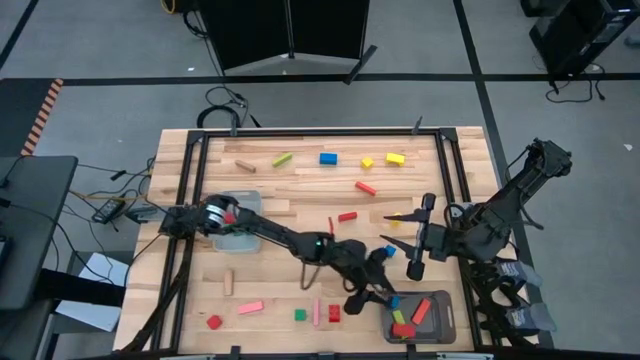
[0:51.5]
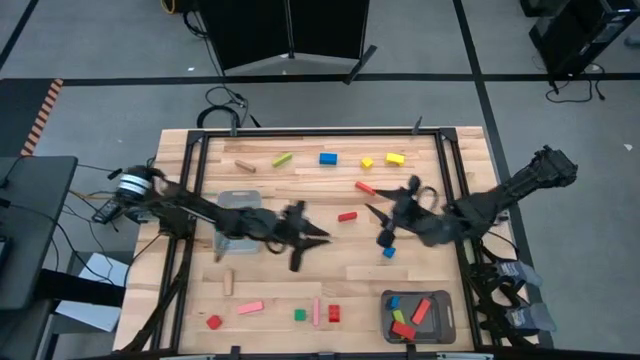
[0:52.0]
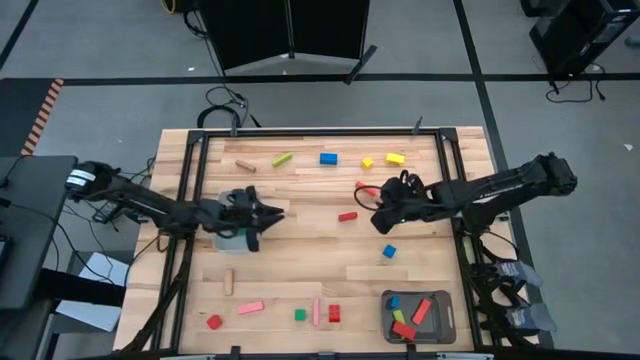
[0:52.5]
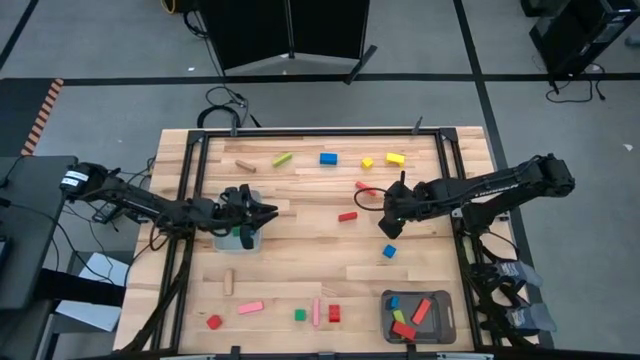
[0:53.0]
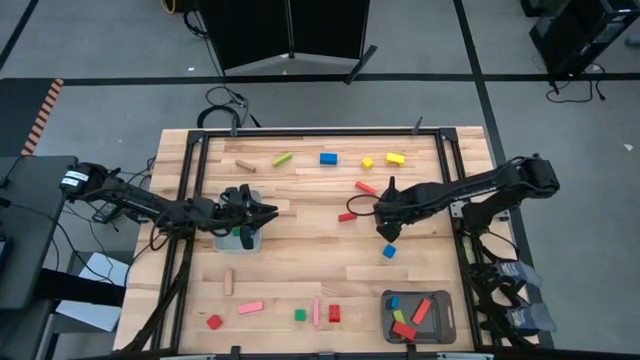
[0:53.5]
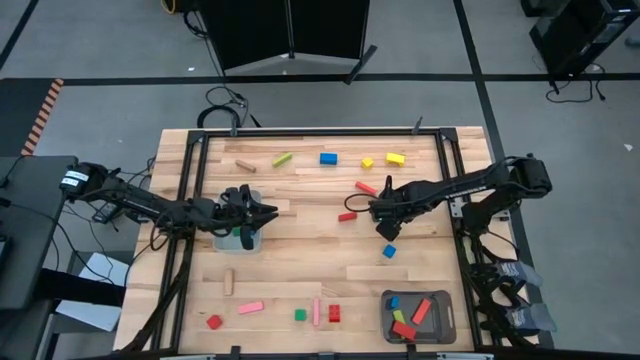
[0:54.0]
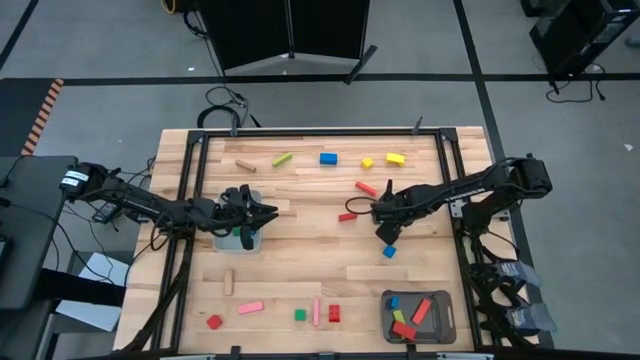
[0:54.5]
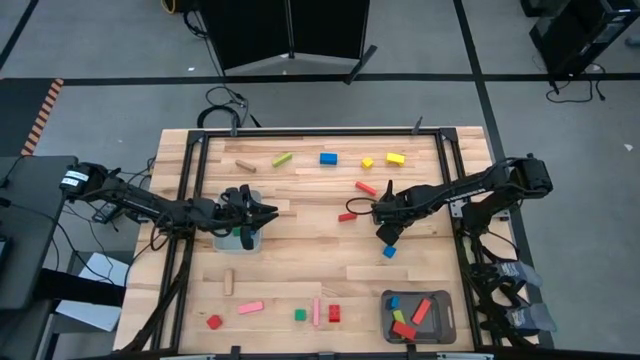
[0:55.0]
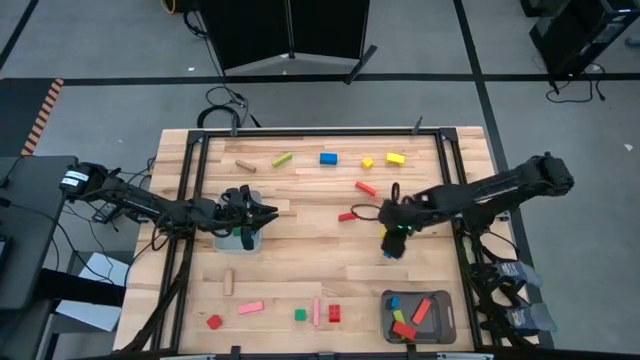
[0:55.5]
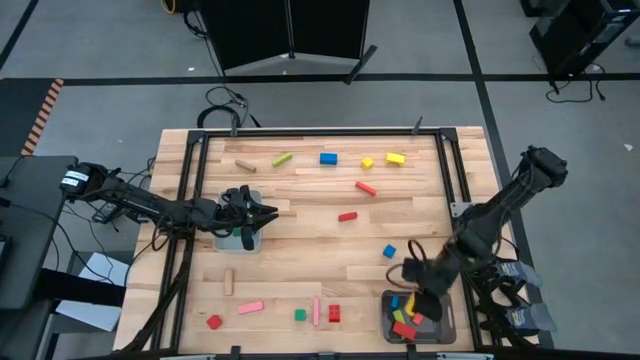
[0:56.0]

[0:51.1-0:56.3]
Task: Sort blocks by size
Put the bottom center right yellow block into the black bin

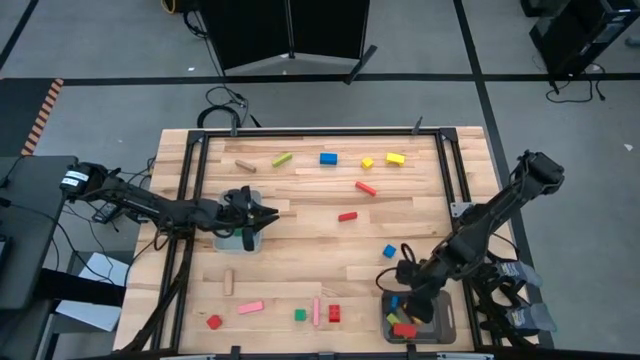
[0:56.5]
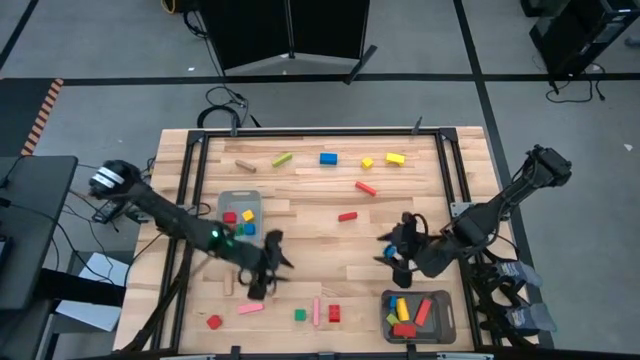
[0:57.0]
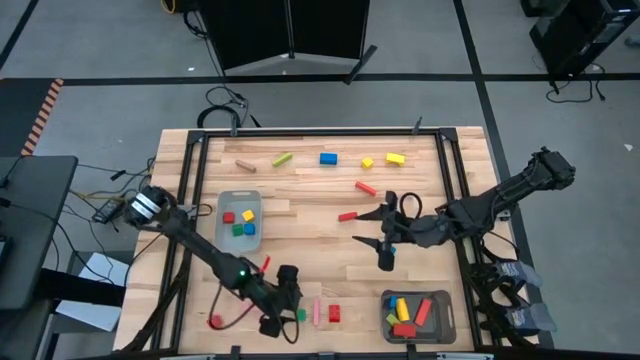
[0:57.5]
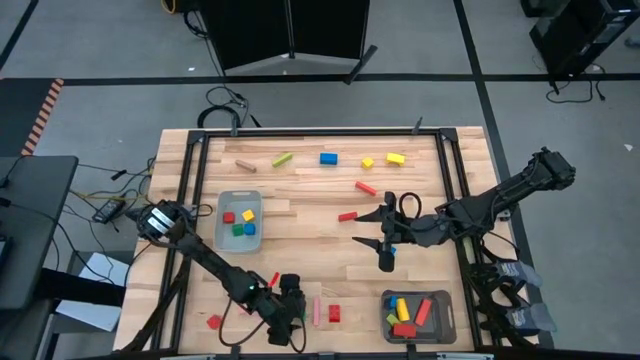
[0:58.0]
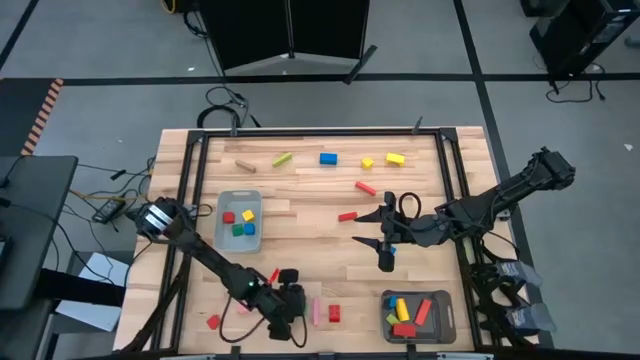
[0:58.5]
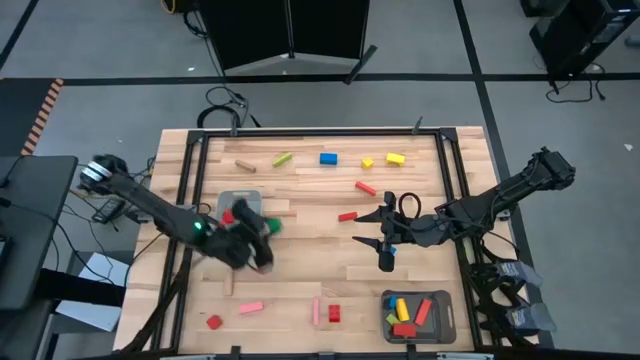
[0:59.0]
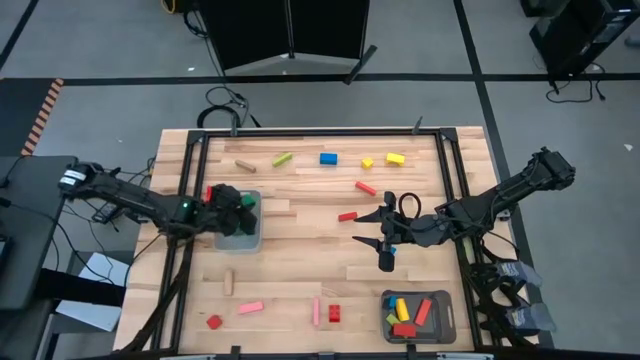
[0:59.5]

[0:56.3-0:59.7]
Put the green block into the grey bin

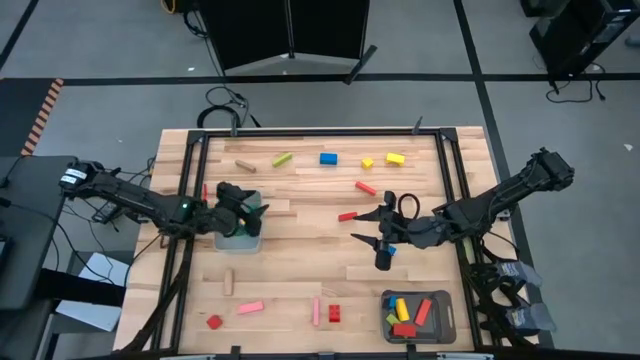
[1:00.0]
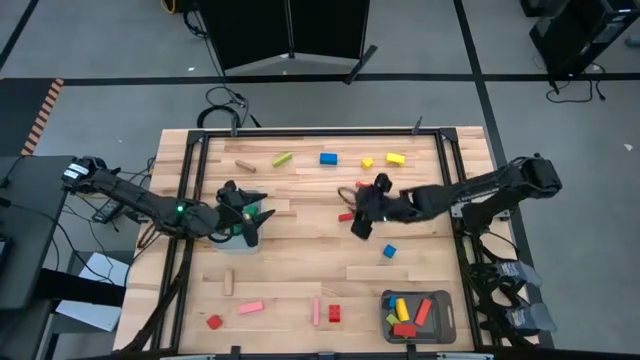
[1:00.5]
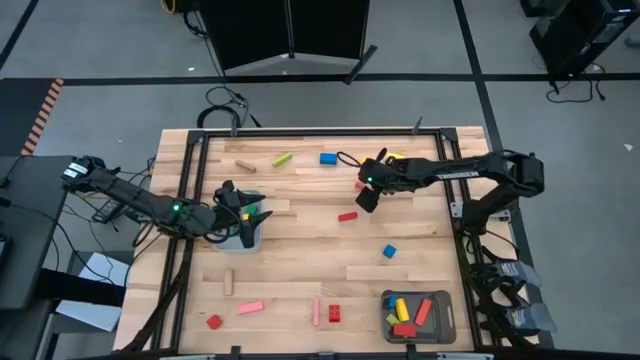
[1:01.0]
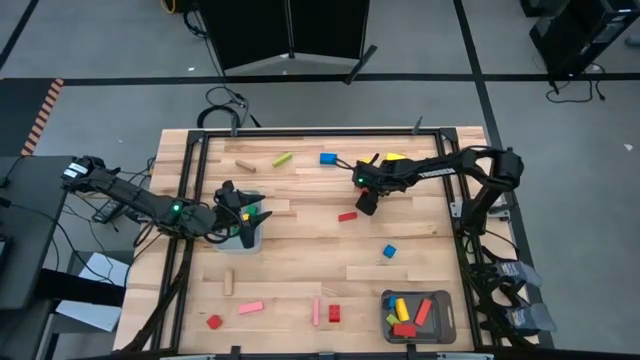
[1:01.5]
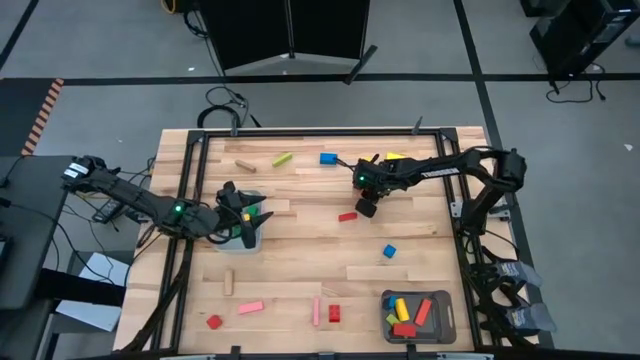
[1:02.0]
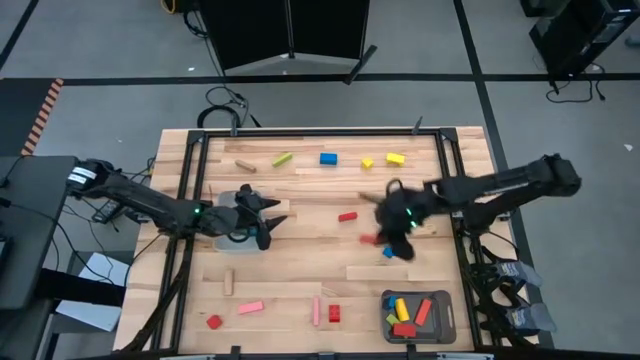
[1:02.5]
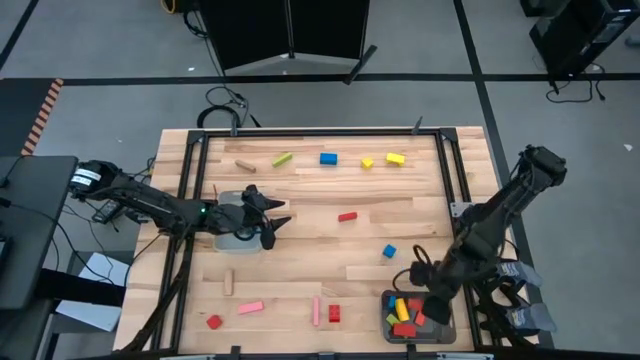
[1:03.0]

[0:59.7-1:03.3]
Put the top right orange block into the black bin

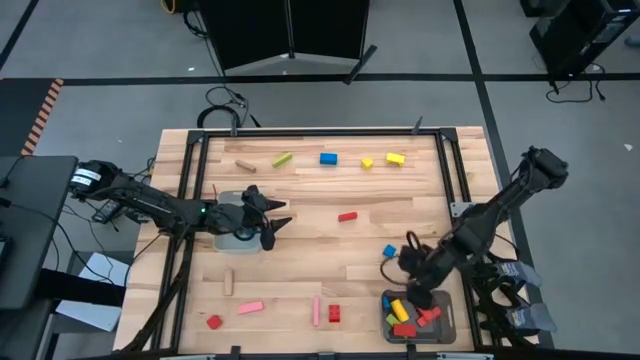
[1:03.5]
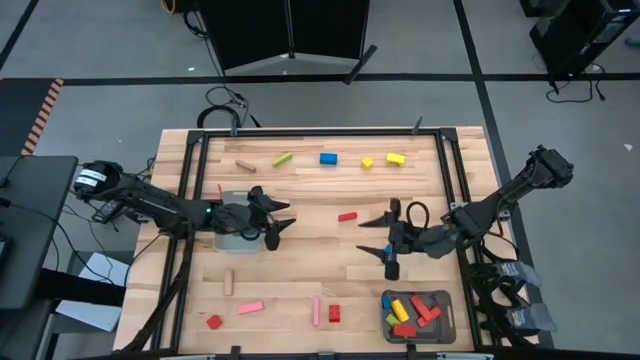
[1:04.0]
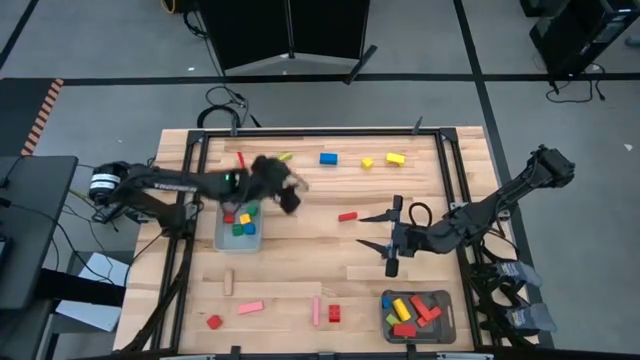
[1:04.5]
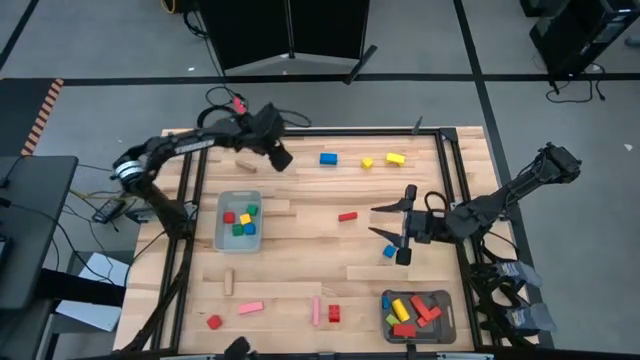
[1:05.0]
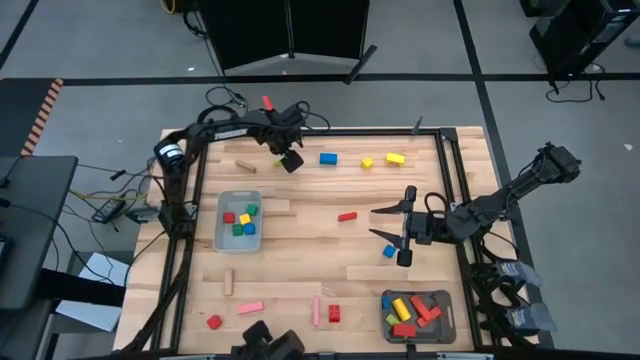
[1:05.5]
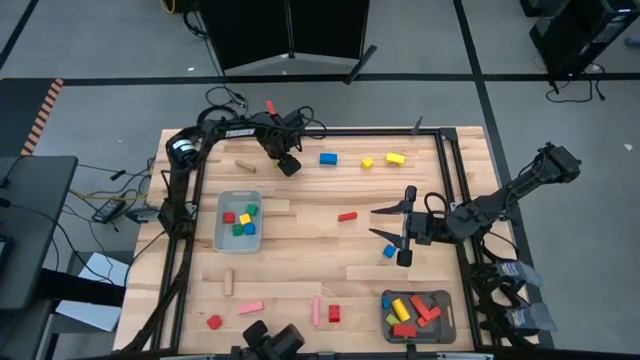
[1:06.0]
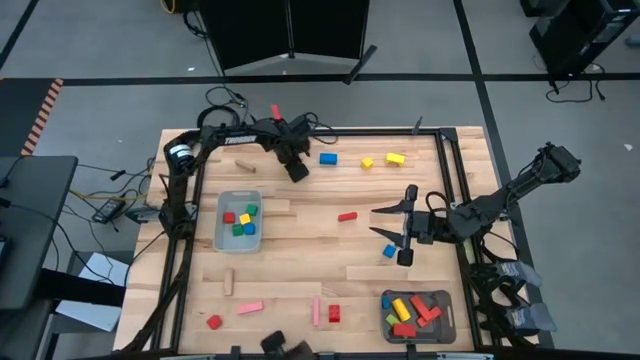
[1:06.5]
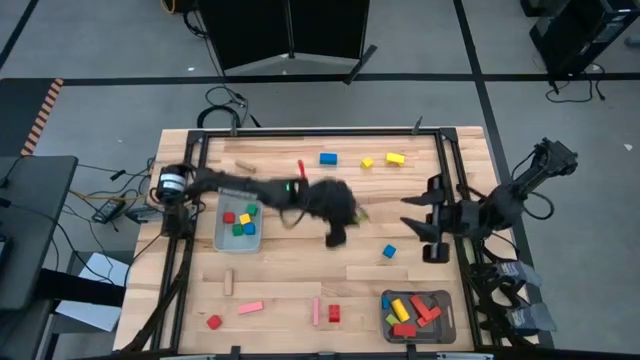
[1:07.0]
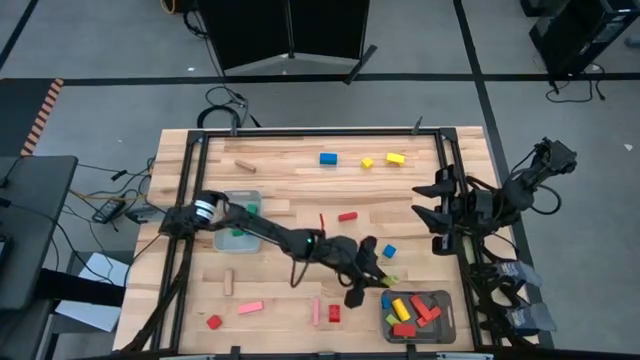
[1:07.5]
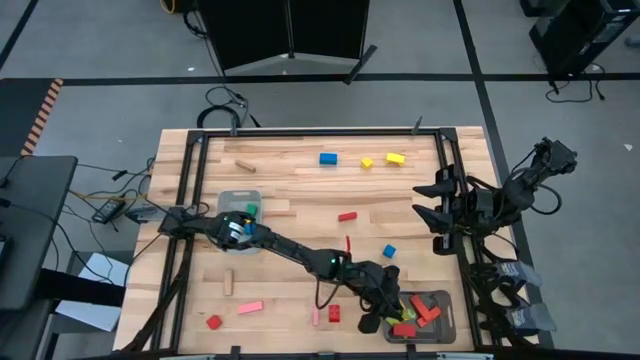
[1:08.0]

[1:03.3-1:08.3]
Put the light green block into the black bin

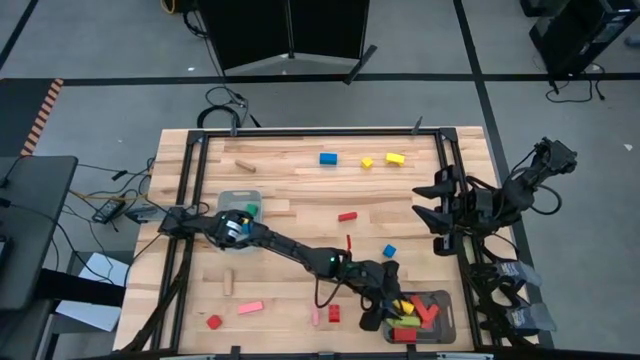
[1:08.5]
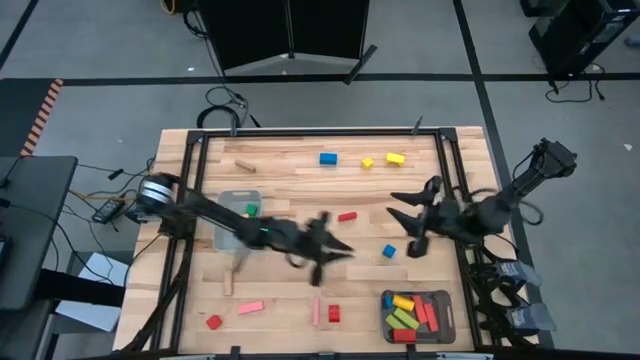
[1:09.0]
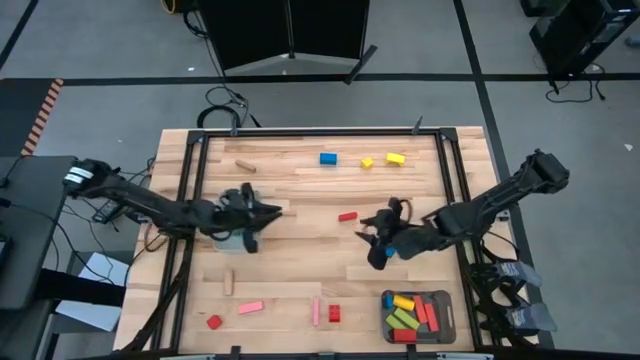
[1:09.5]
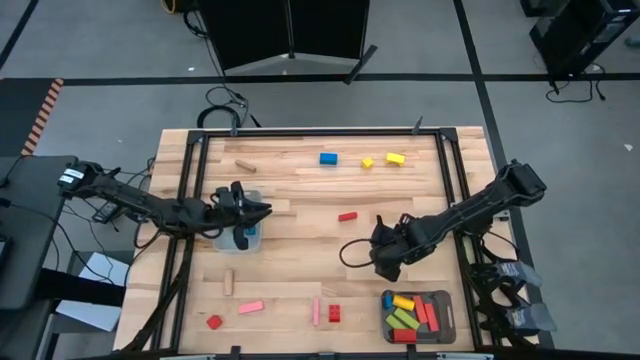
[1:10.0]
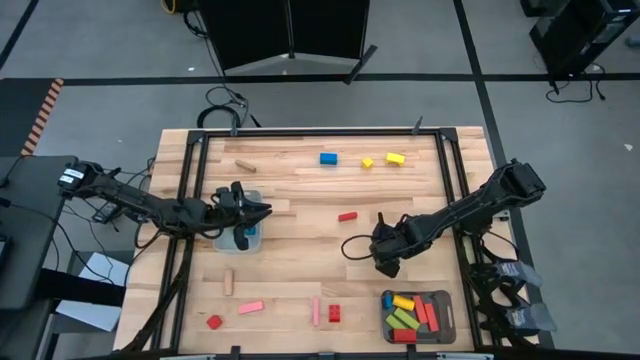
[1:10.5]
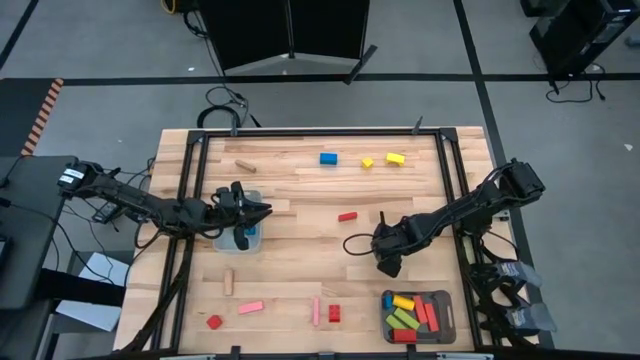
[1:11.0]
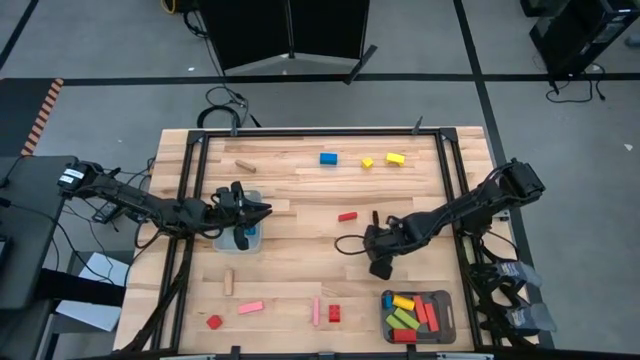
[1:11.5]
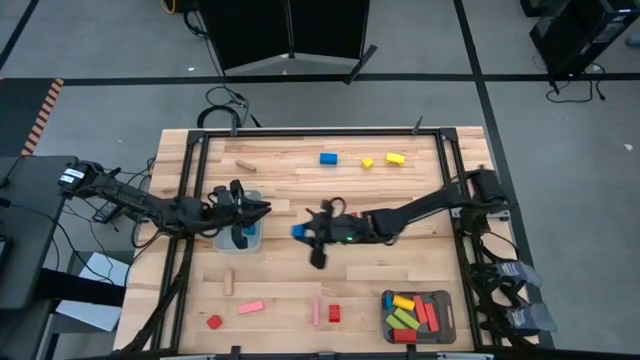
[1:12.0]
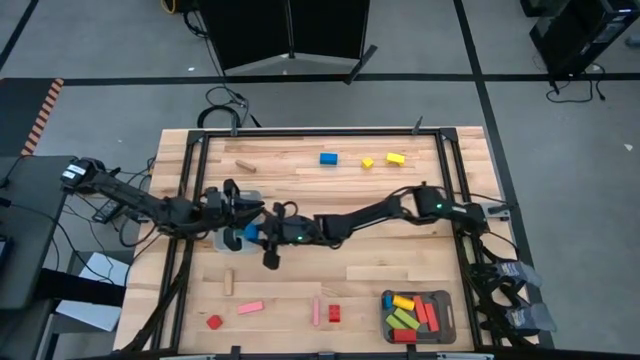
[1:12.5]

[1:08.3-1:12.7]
Put the bottom blue block into the grey bin
